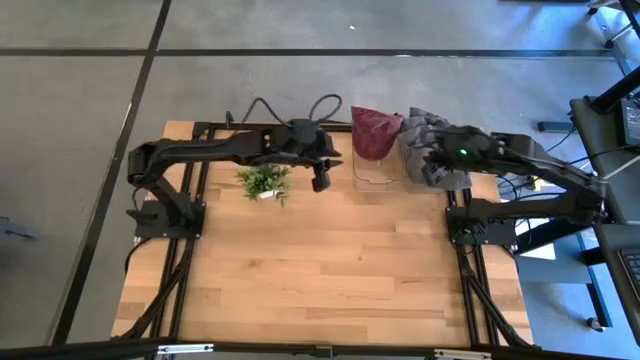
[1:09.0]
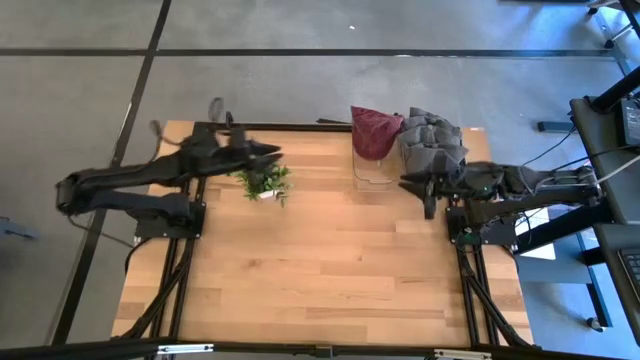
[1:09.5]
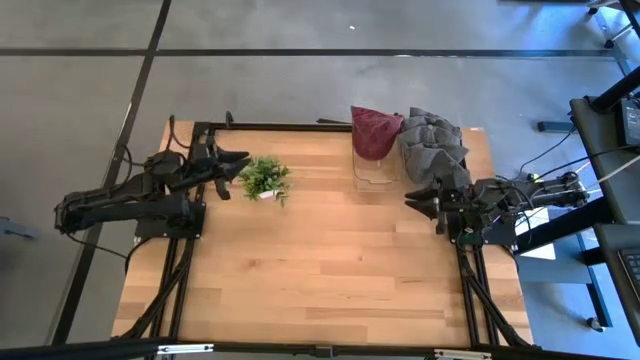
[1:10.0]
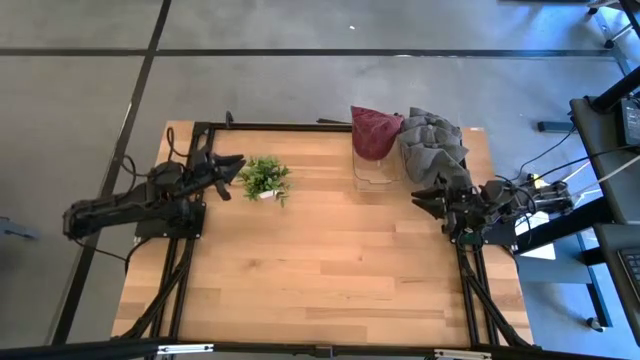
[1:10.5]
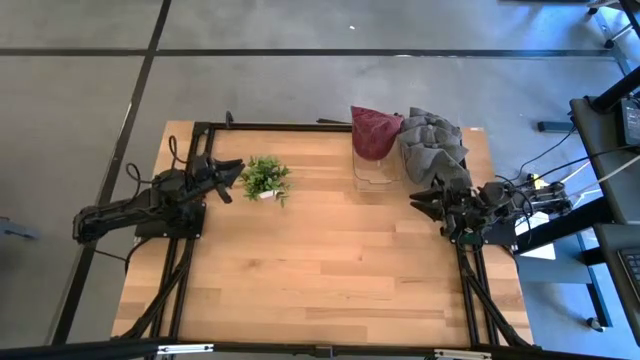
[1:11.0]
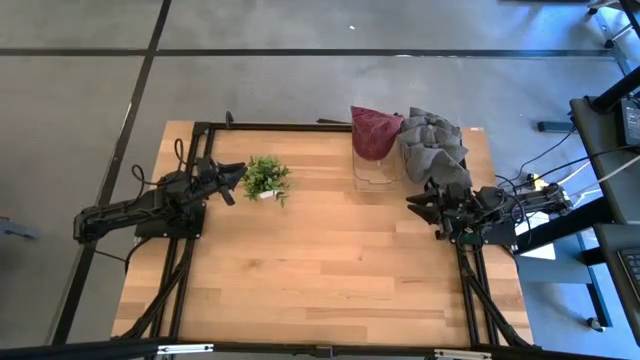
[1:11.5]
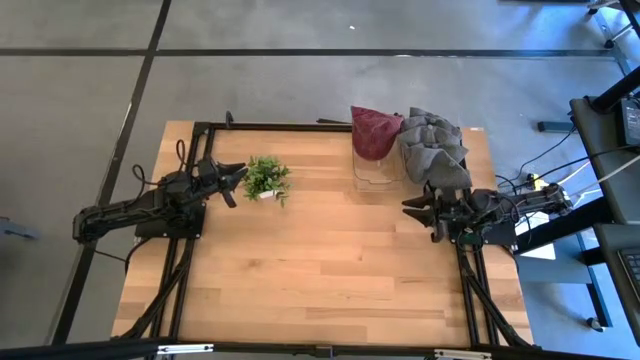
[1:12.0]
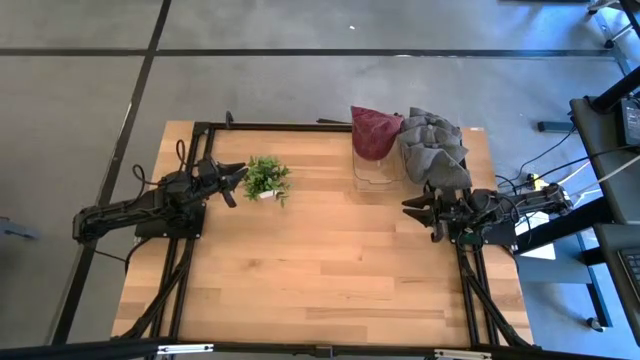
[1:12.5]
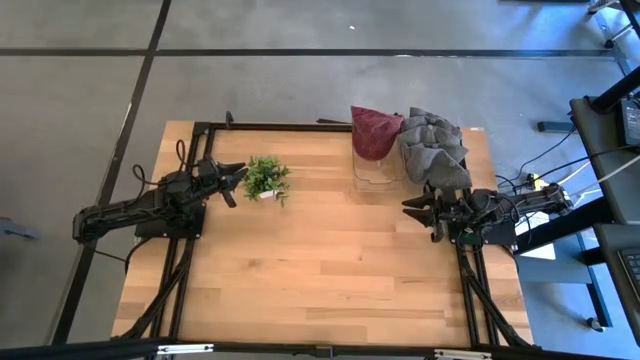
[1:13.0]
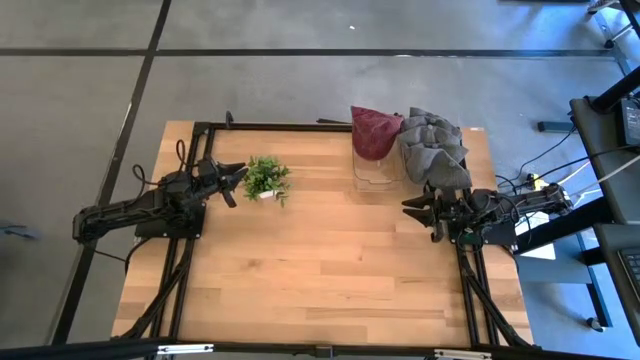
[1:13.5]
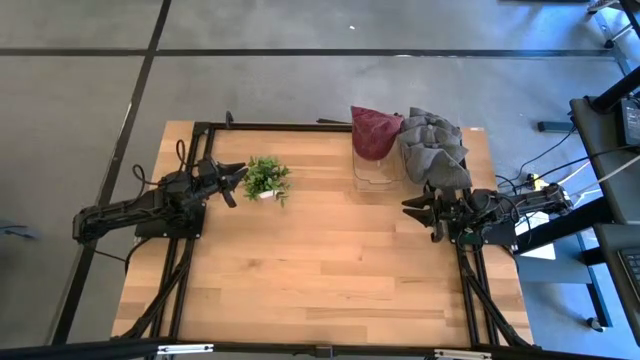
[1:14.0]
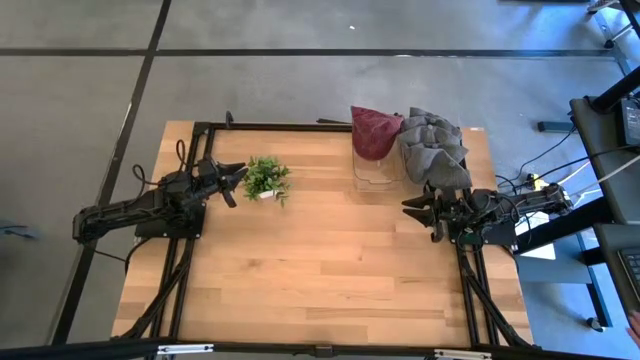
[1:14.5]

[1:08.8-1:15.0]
Task: Pick & Place hat
Return to Home Position

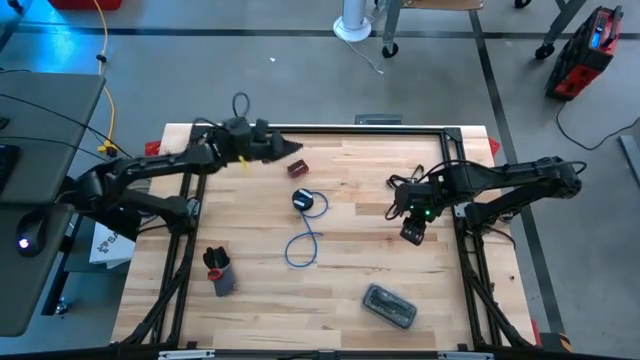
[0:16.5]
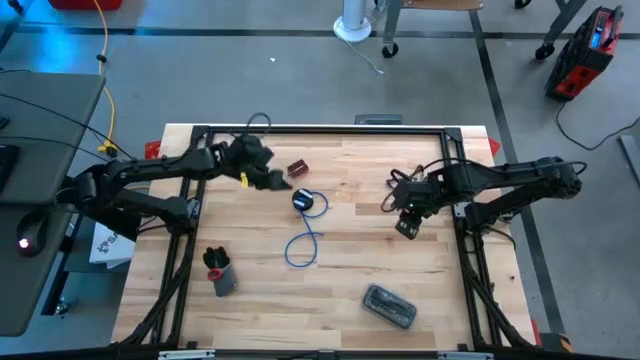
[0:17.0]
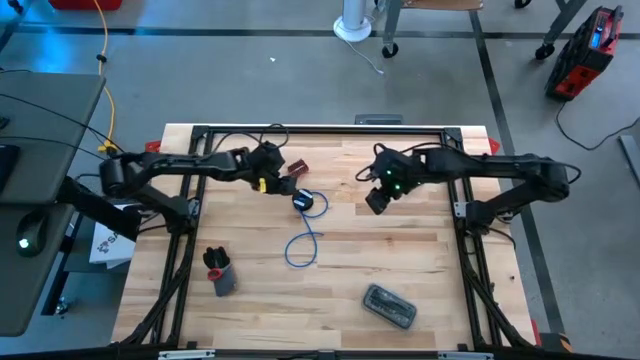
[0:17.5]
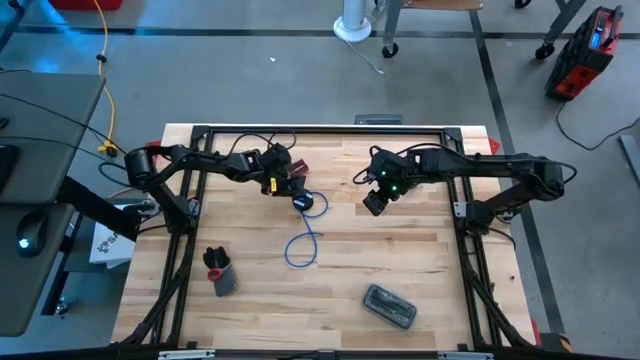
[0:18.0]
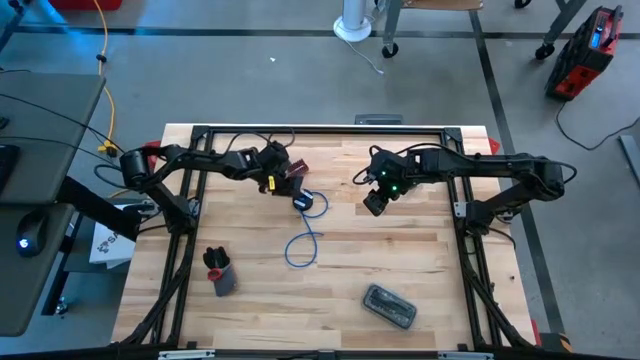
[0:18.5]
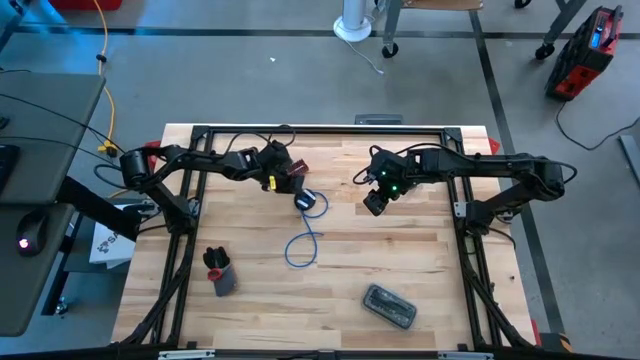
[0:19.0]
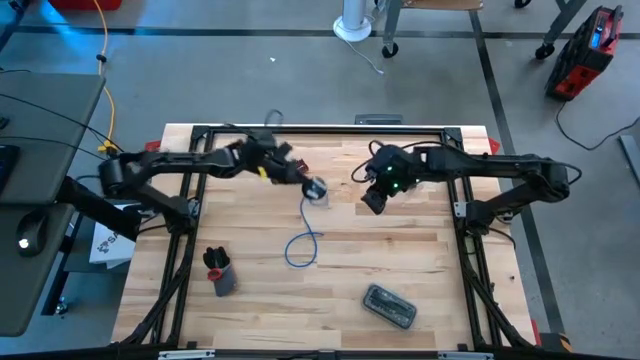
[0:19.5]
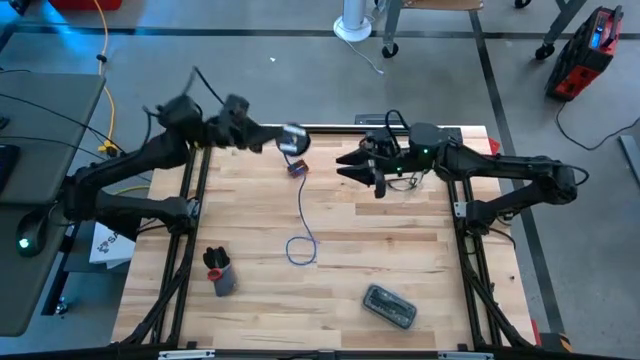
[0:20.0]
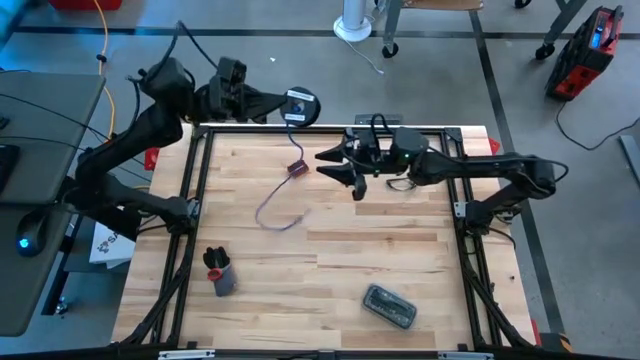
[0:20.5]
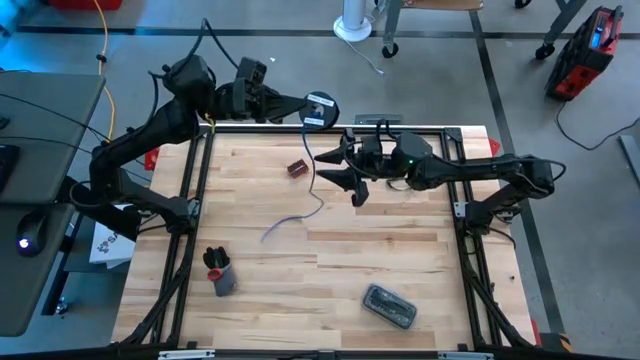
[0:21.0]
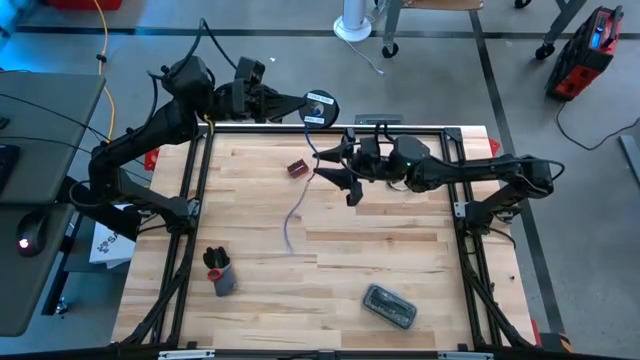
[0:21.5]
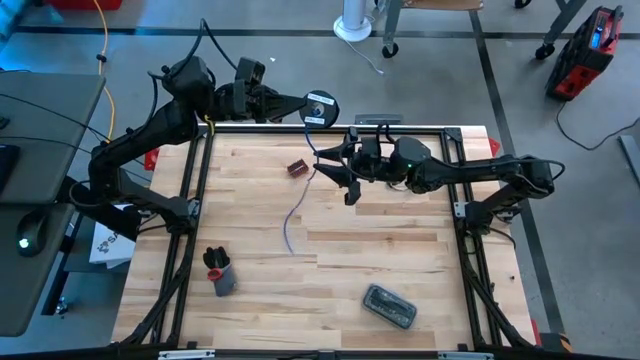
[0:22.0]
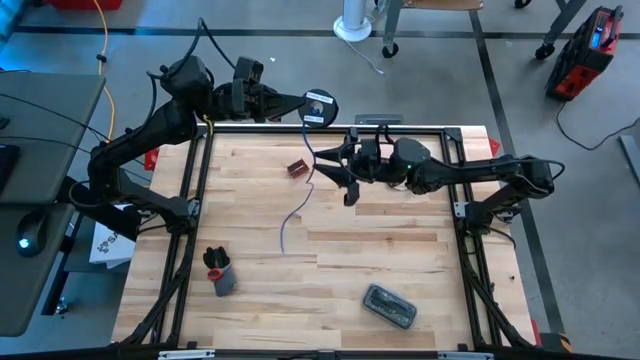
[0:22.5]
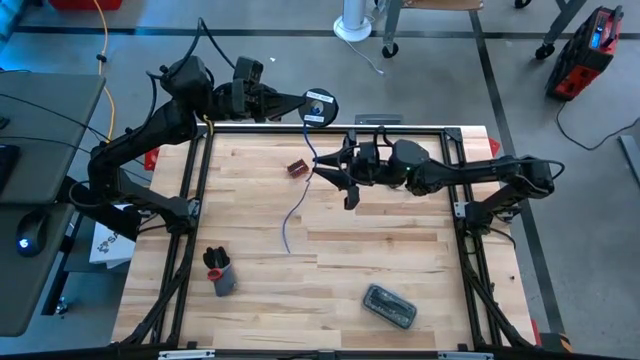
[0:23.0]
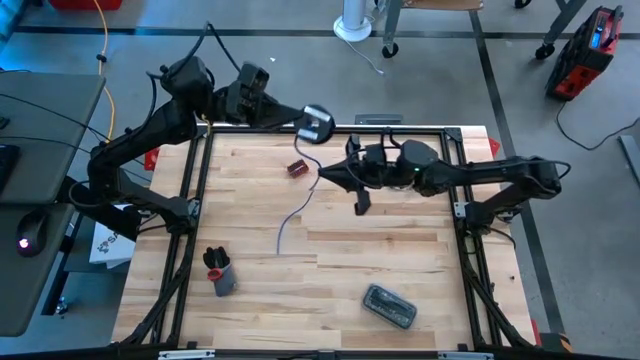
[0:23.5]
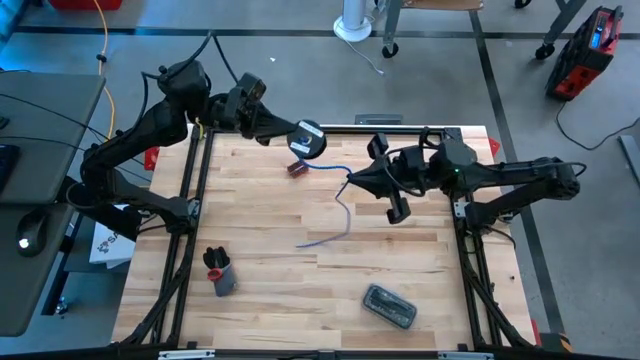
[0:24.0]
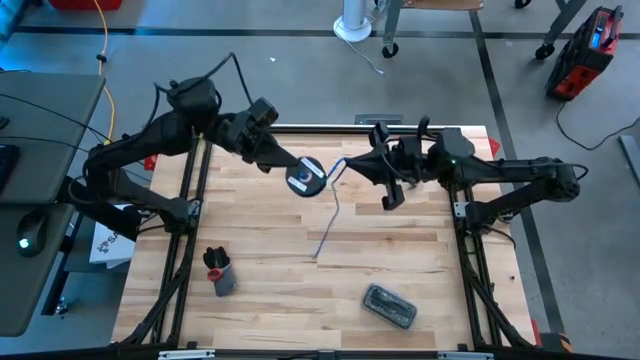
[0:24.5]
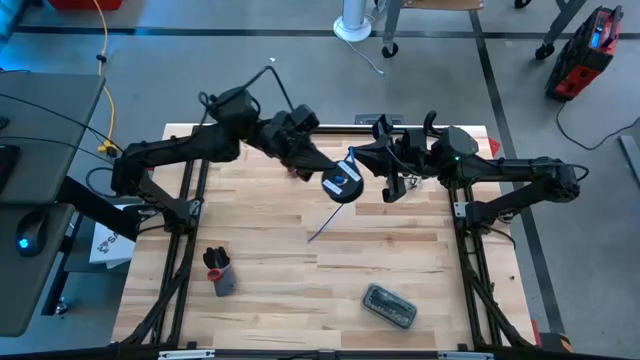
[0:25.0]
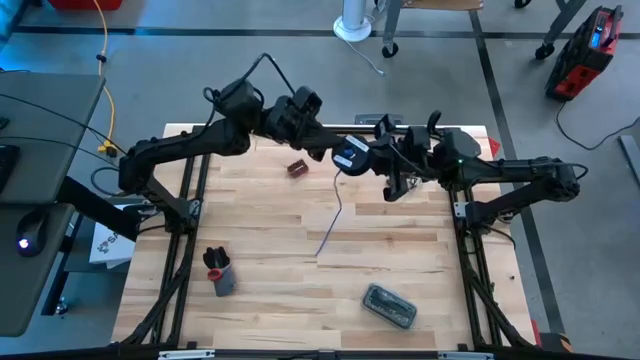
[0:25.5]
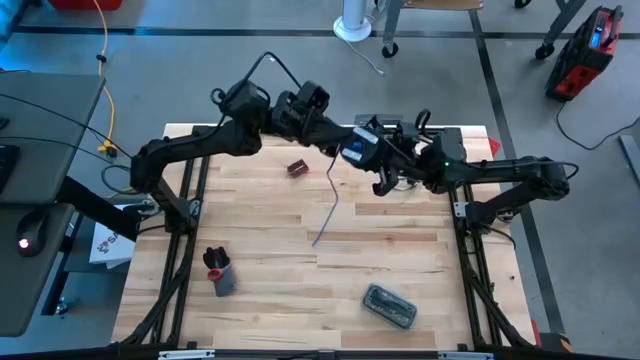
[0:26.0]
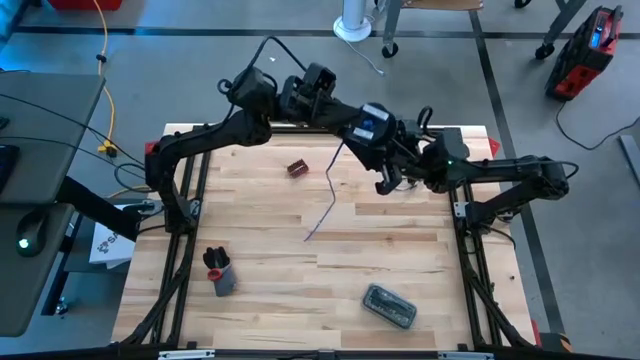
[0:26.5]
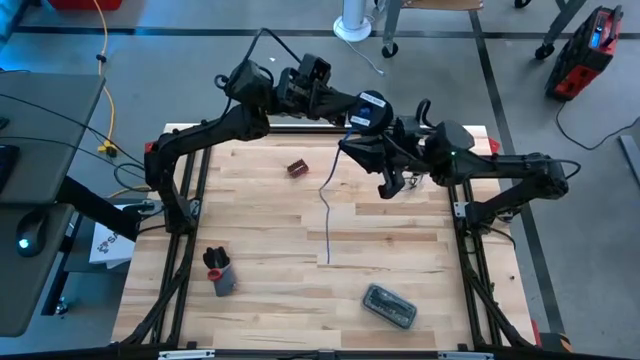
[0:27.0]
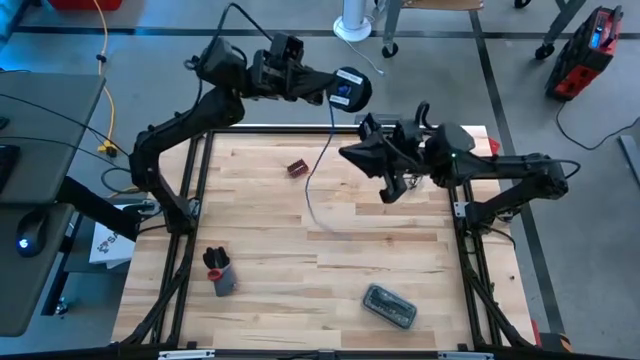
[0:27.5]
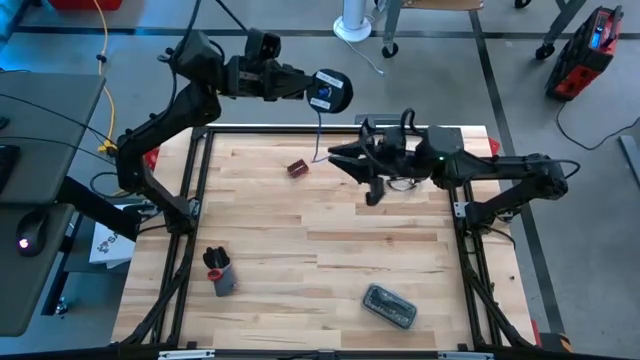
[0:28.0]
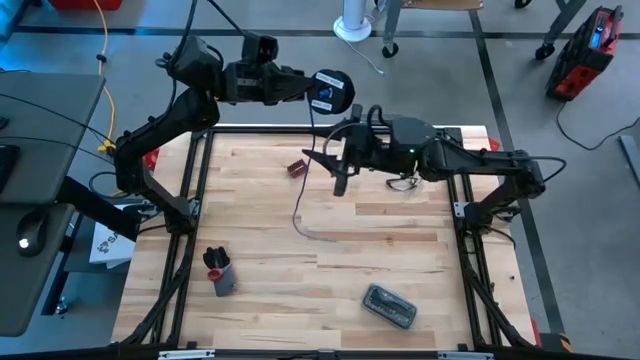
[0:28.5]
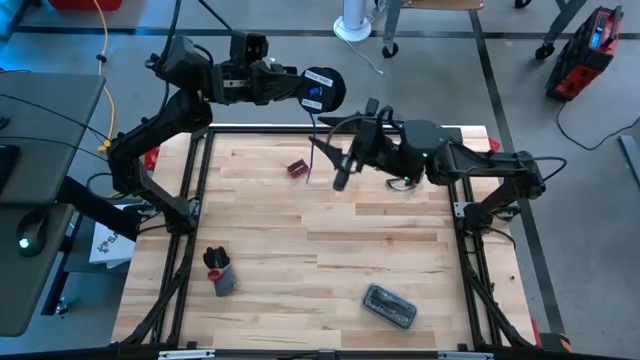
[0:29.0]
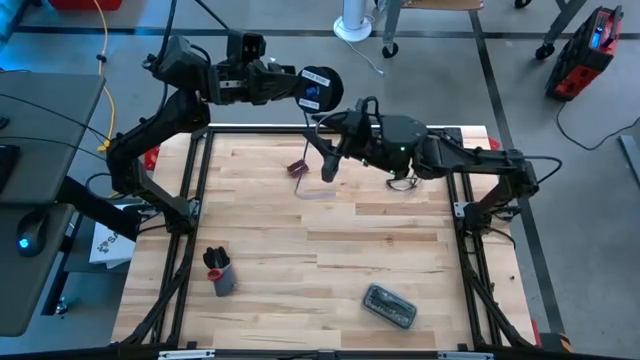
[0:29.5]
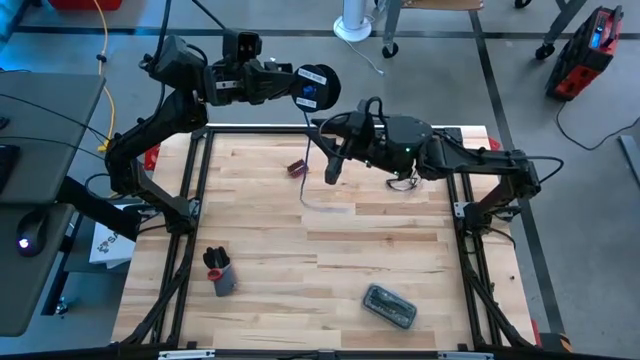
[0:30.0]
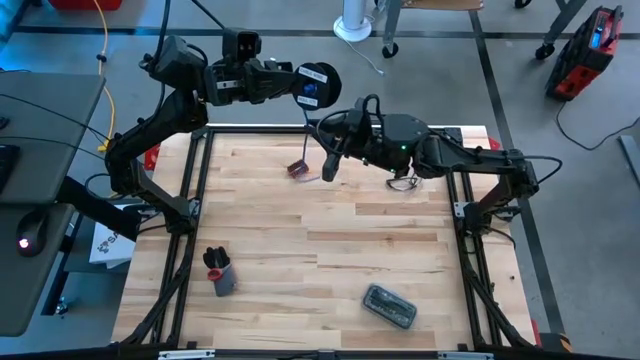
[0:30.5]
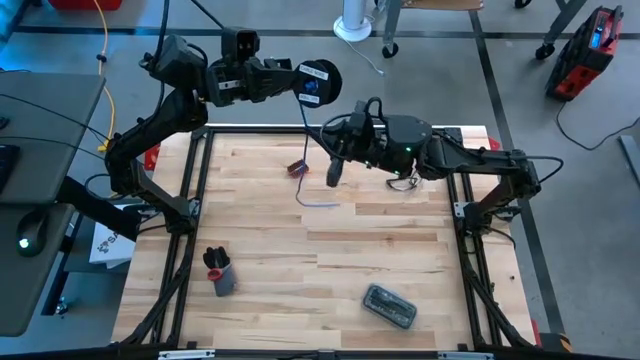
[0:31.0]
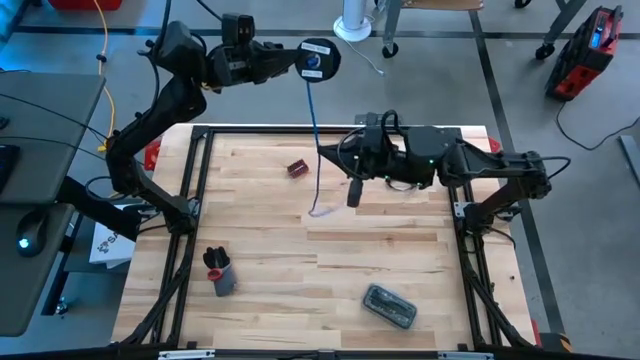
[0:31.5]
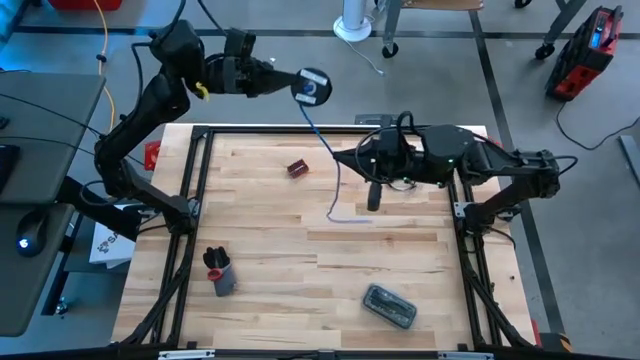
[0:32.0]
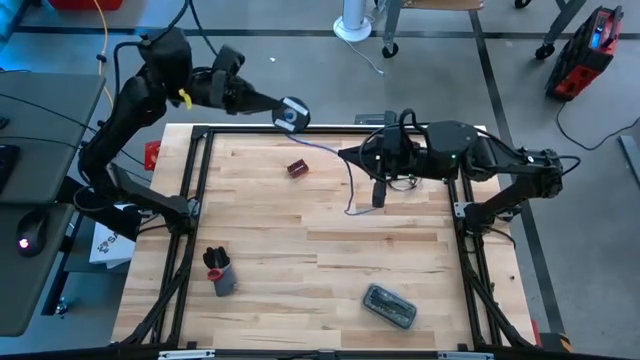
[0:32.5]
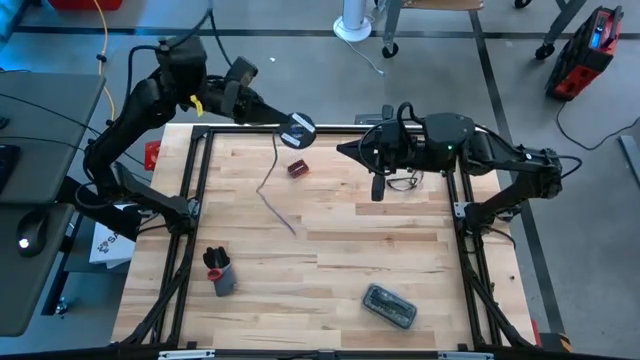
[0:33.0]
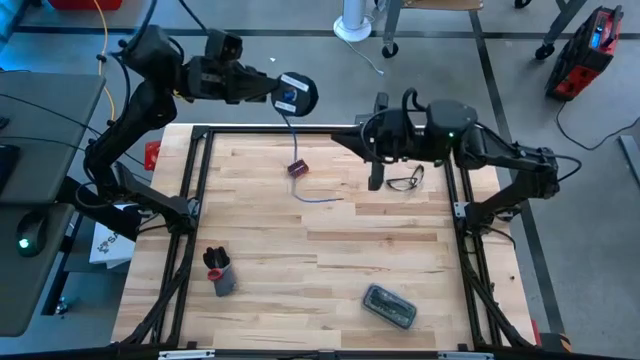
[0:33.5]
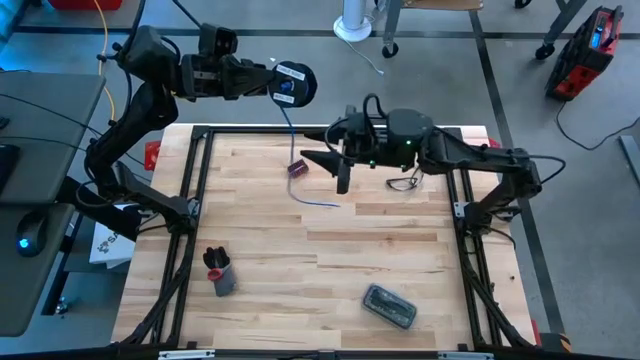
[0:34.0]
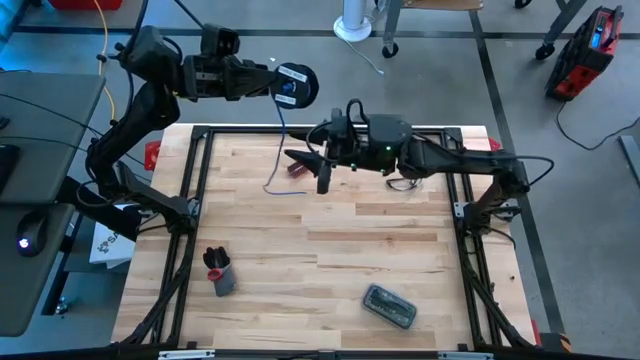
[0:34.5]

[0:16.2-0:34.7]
Task: Coil cords
Coil the blue wire onto the spool
